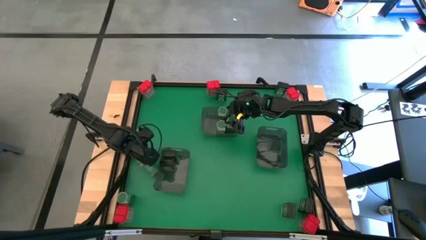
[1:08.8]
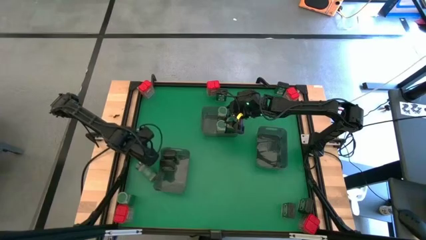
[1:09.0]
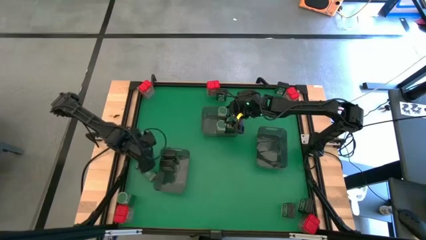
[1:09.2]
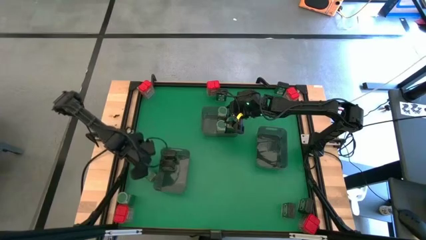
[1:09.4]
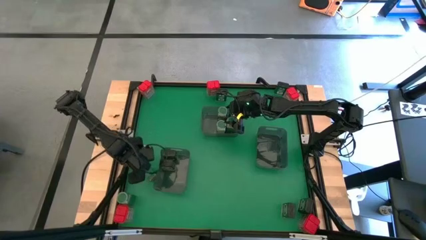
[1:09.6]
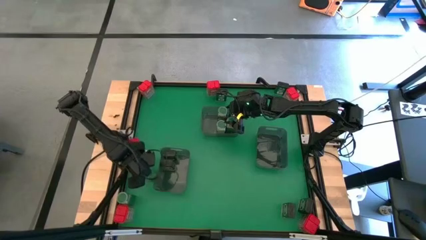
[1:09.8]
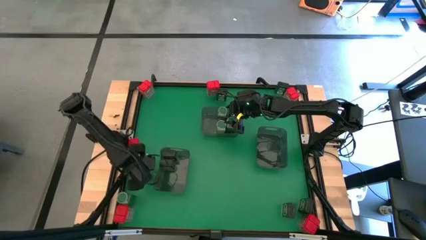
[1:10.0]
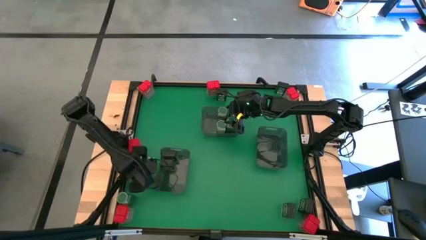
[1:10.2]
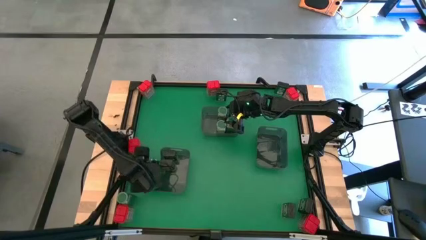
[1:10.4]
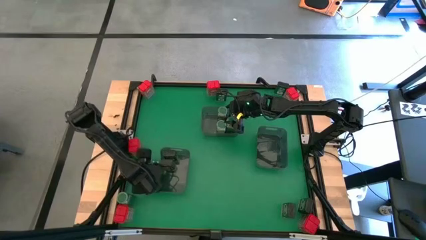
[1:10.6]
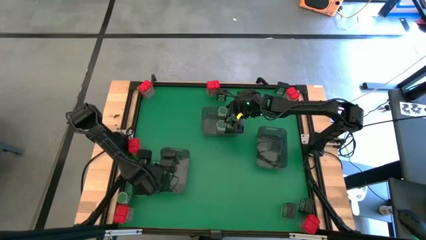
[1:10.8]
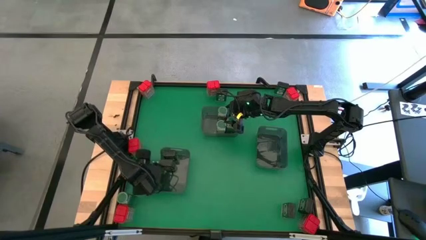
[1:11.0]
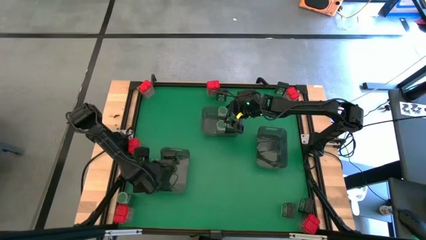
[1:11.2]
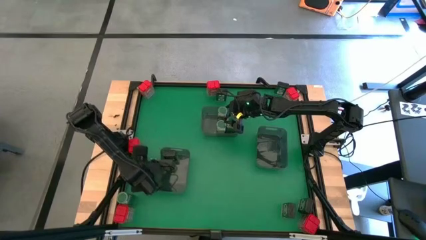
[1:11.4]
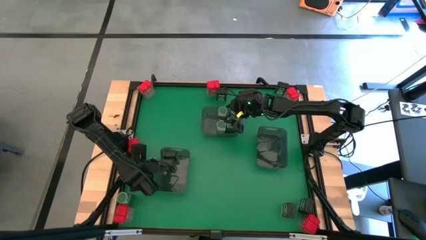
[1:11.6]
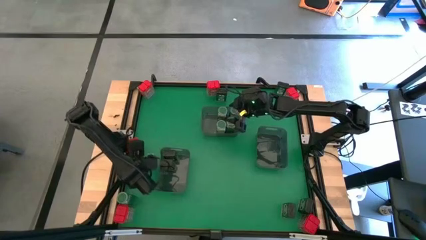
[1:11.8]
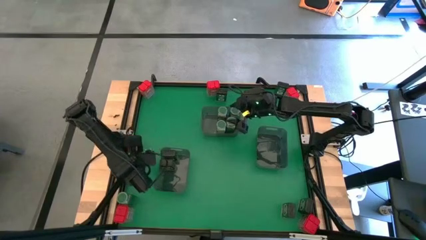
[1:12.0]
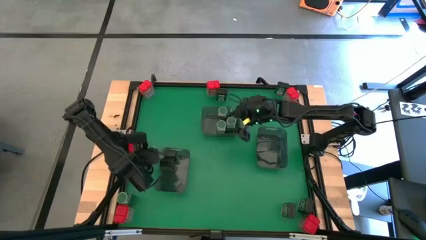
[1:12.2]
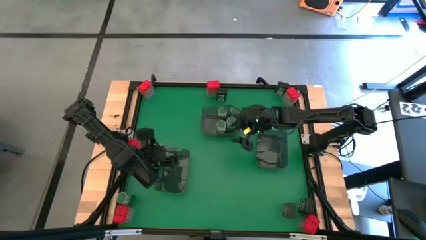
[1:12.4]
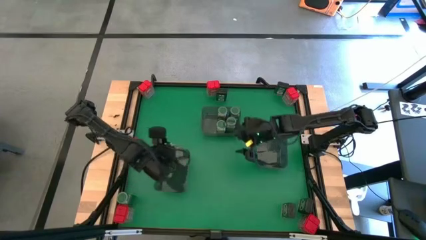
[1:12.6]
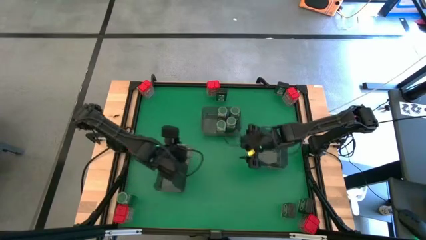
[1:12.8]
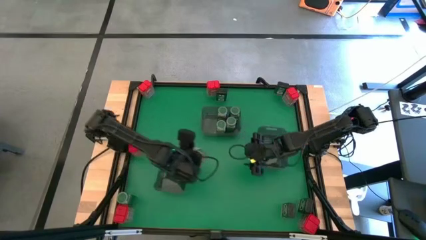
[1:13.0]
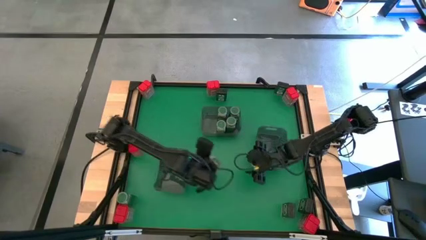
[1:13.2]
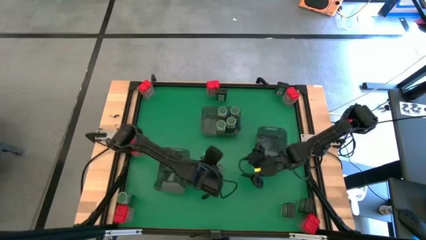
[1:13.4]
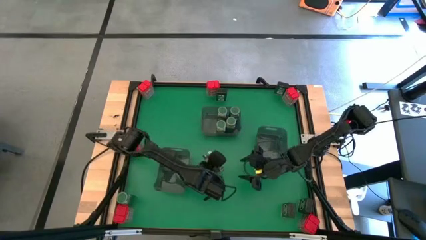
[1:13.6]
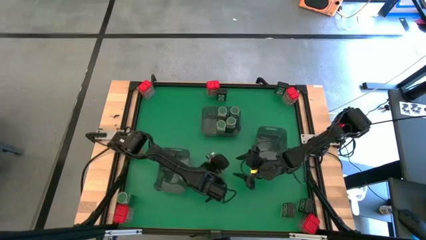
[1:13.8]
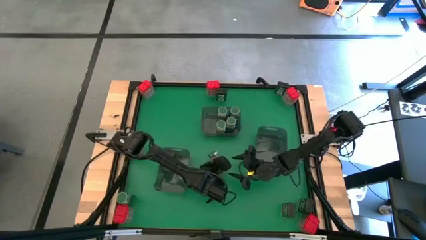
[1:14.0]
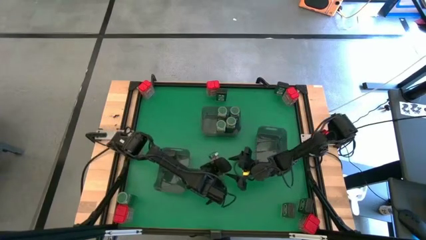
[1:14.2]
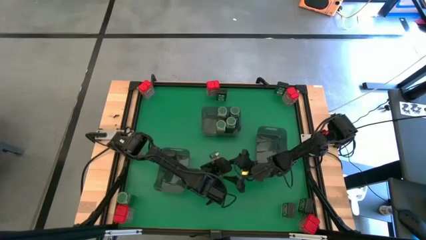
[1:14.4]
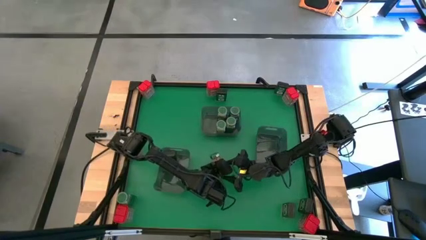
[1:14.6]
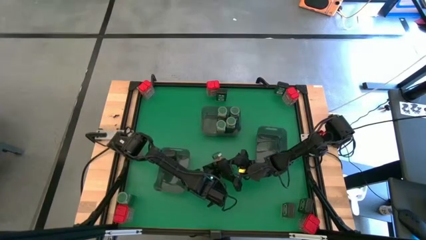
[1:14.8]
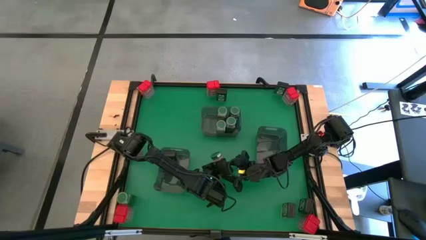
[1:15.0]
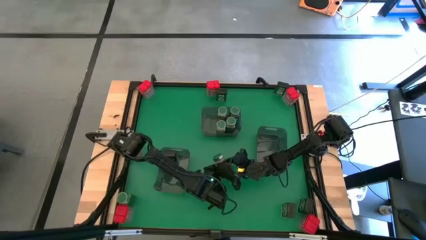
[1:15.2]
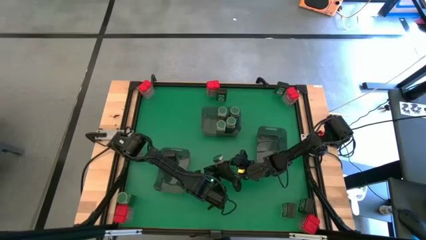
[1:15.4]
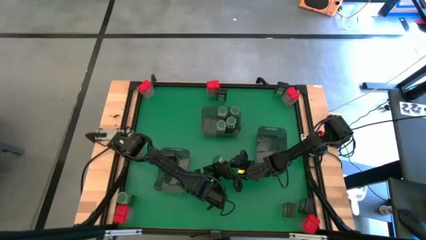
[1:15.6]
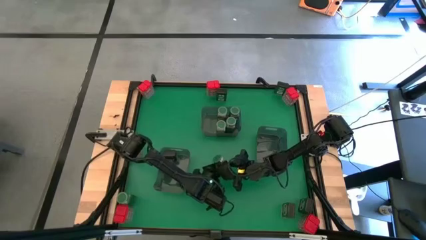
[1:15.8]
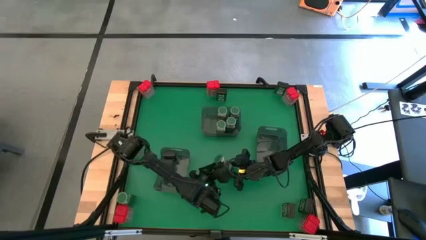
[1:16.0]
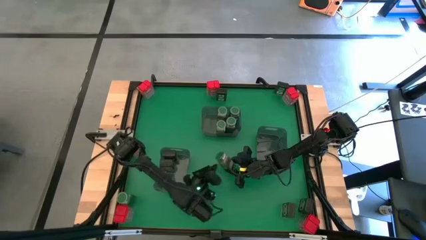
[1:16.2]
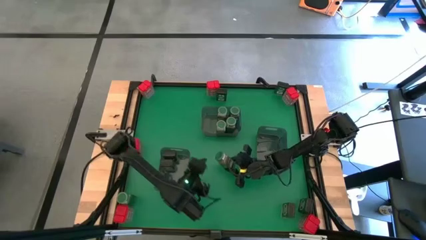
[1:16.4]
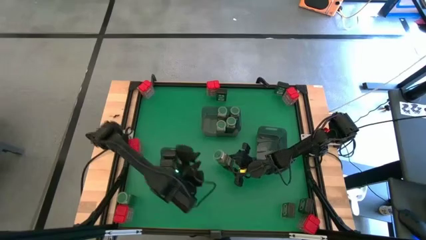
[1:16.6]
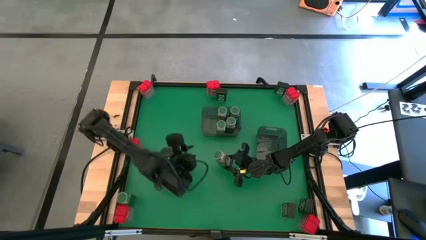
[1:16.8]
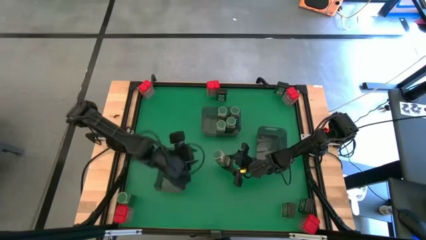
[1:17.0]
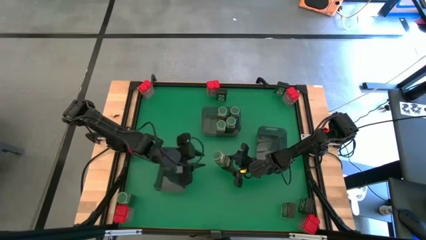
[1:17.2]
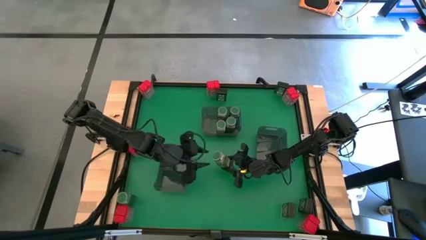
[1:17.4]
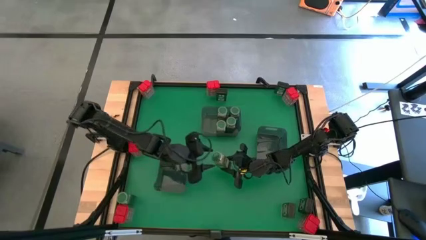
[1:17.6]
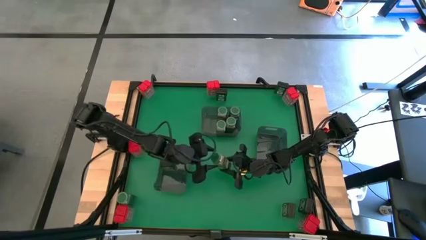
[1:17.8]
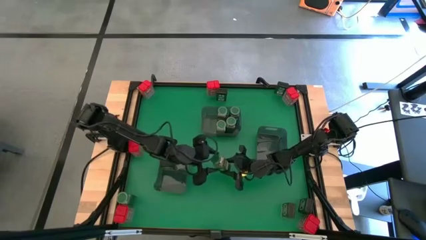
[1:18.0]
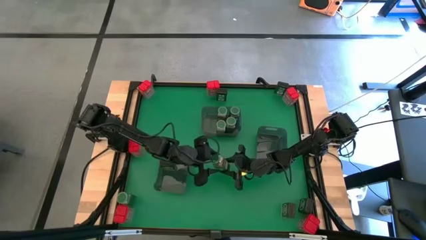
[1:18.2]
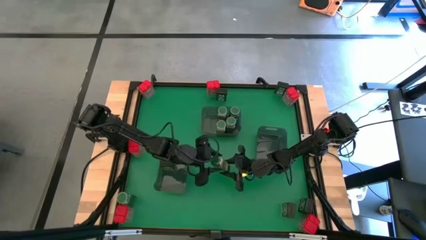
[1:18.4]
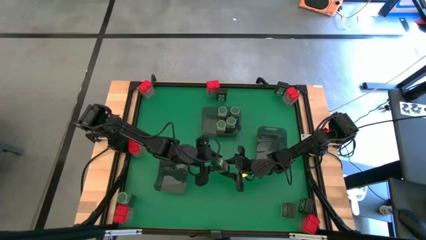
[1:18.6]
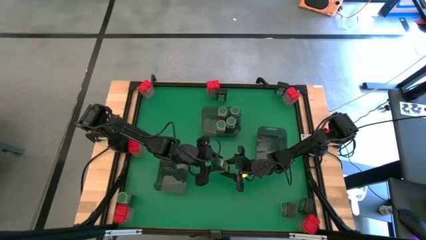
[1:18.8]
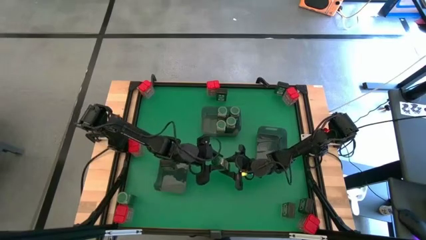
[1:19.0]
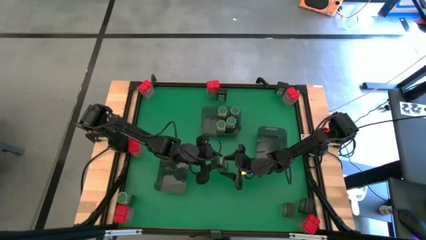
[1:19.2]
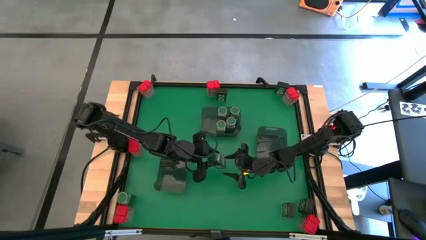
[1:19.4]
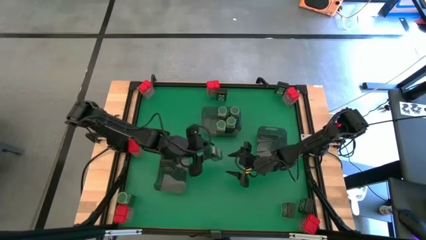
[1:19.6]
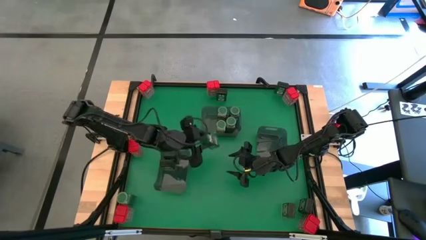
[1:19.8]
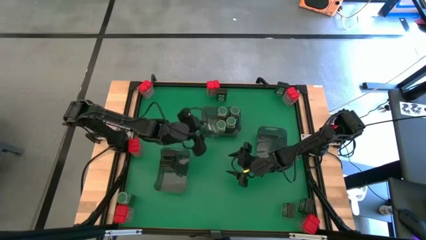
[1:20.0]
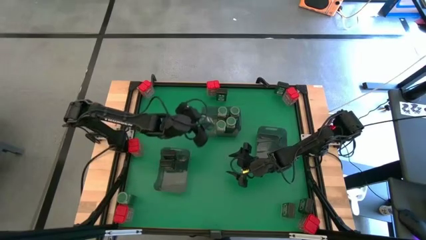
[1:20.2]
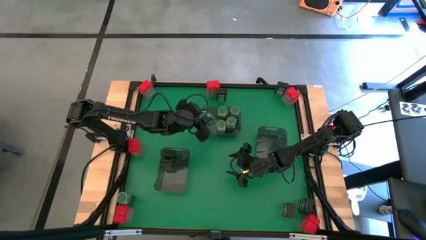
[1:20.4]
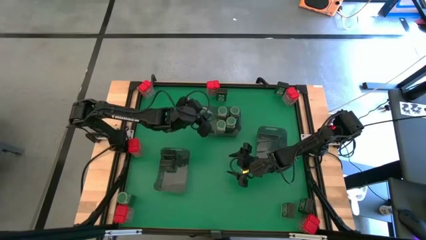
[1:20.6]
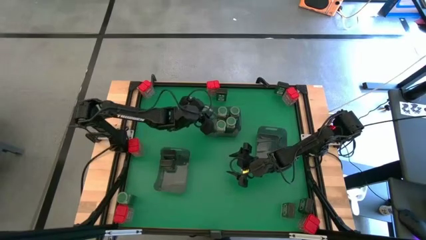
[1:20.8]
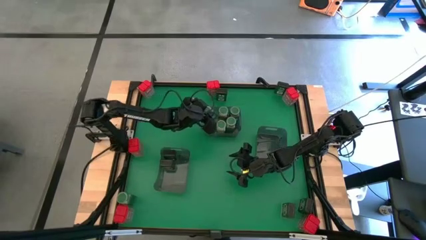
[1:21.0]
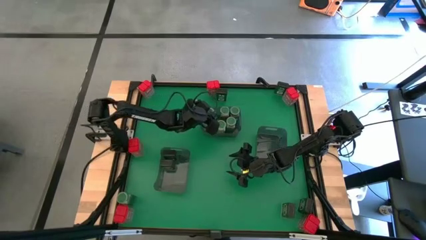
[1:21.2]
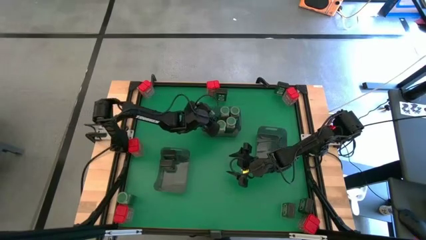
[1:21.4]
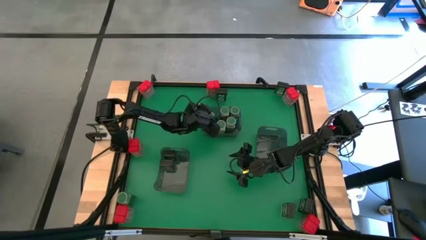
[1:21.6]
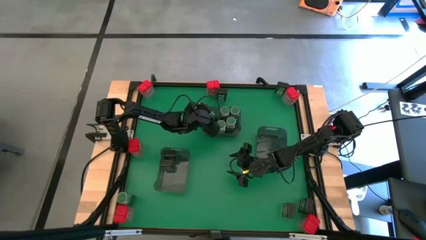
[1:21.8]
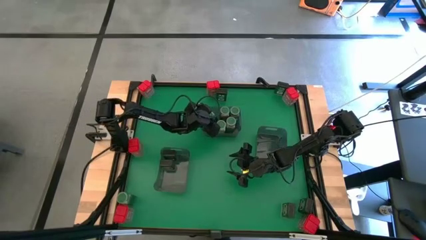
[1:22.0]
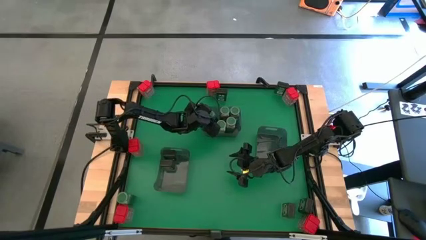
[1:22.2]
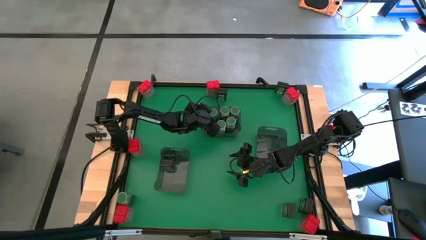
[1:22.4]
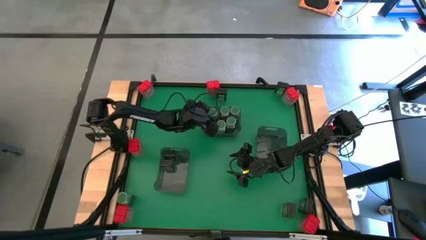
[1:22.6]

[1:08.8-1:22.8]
Task: Sort spices by type
Put the green seasoning bottle into the top black bin

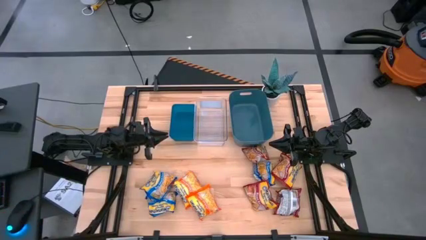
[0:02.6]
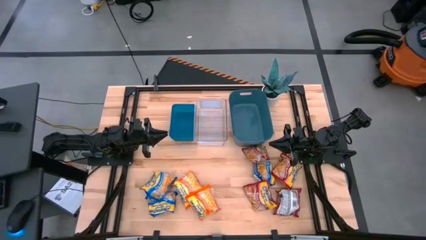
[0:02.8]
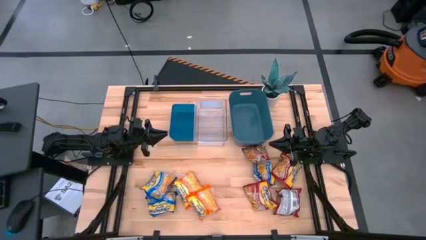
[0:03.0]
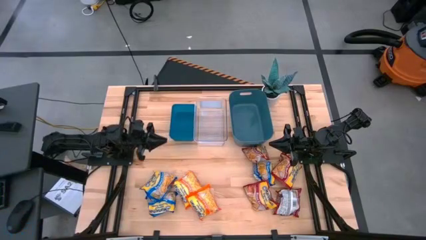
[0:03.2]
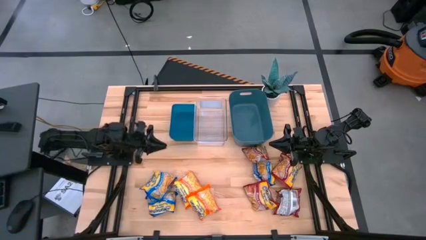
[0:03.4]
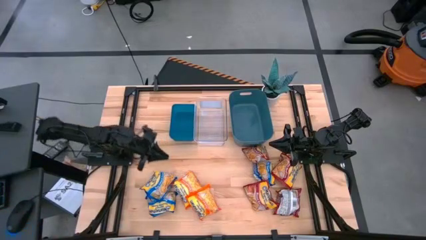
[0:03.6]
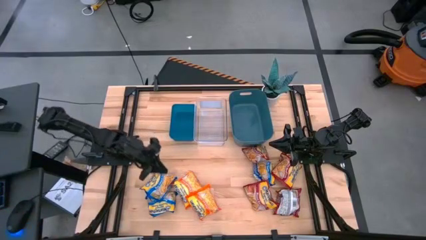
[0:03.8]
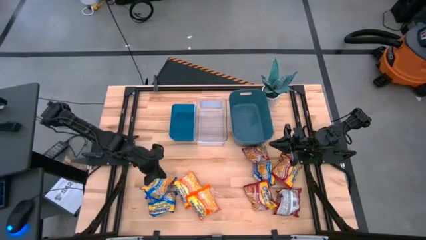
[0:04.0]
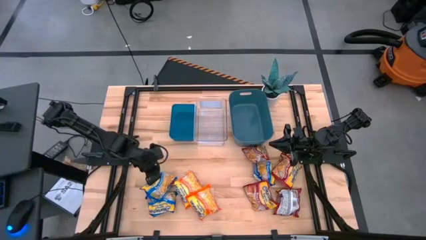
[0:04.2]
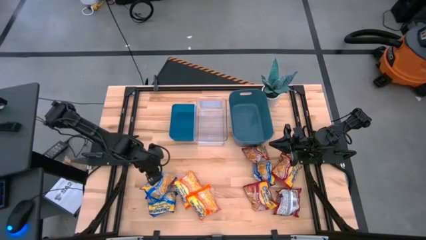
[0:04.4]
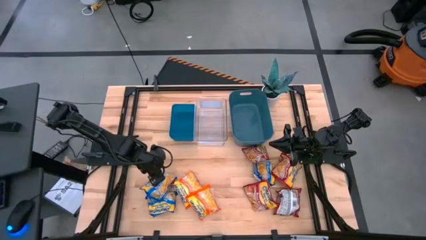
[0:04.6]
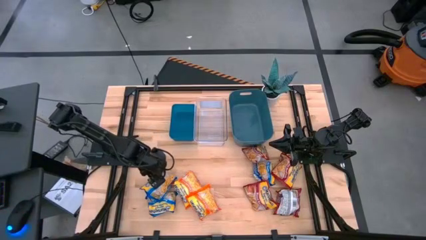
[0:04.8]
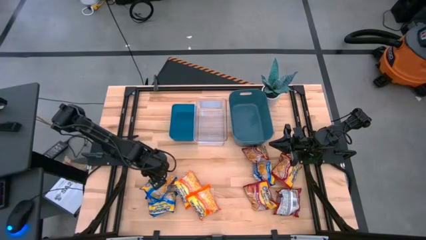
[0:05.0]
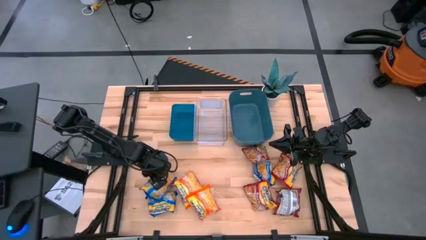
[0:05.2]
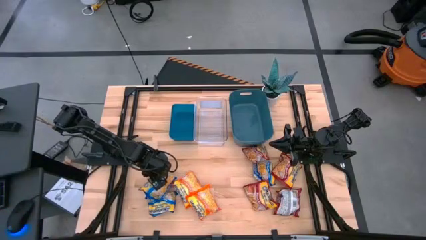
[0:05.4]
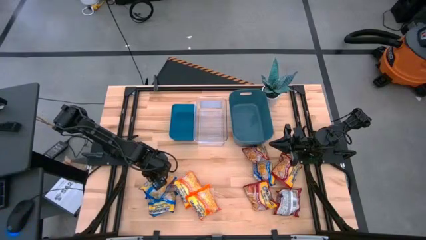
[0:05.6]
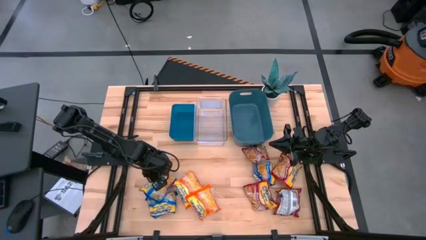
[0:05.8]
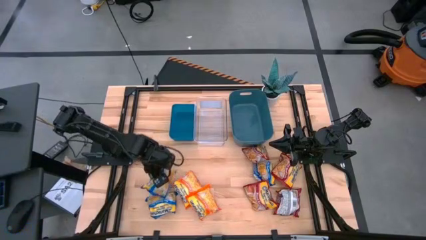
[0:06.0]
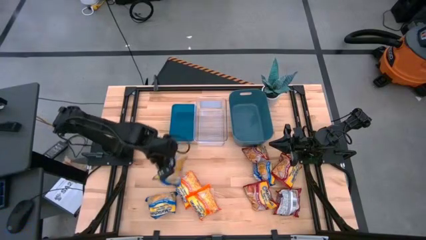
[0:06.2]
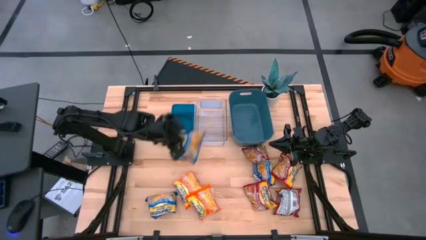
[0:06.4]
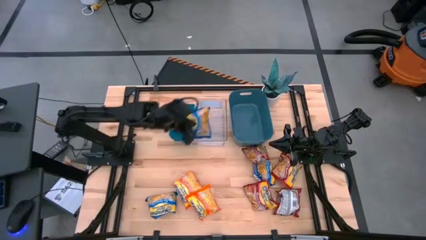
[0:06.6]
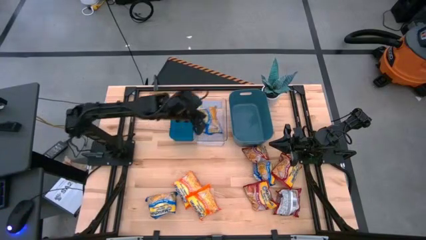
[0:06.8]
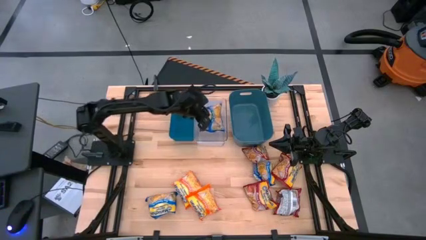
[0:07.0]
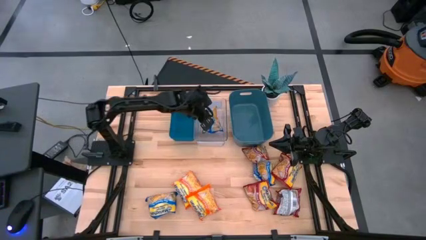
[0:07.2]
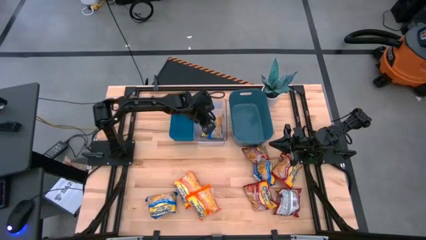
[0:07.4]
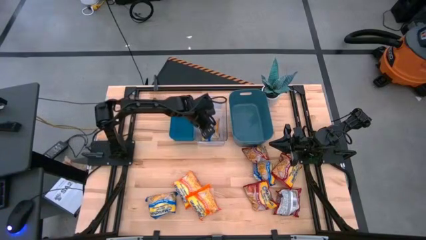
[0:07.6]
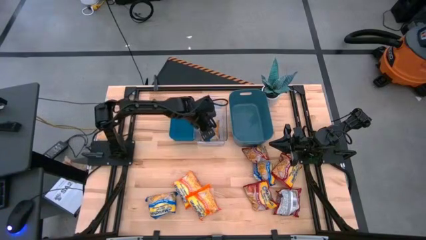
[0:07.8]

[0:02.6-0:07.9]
Task: Sort Maruchan noodles
Put the top left blue noodle pack into the transparent bin
